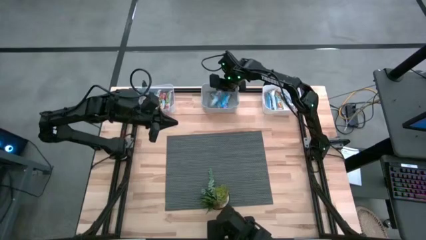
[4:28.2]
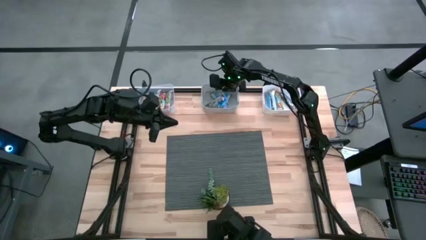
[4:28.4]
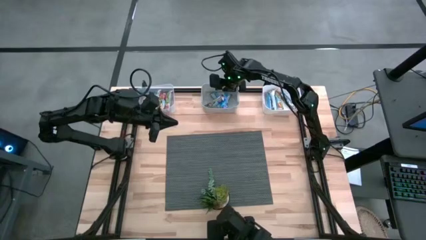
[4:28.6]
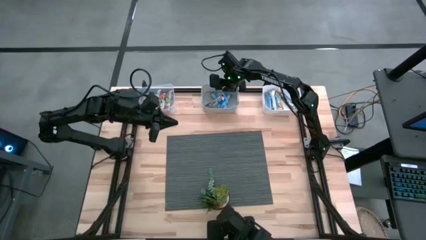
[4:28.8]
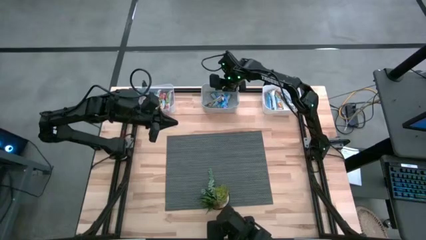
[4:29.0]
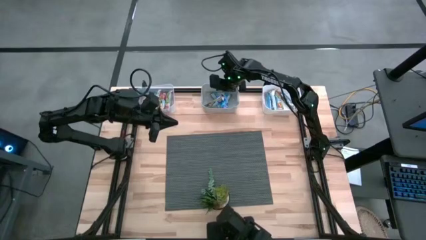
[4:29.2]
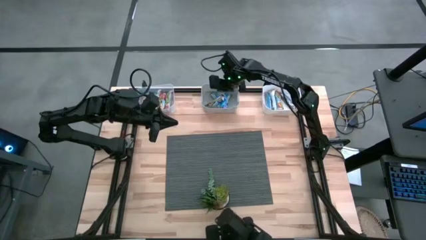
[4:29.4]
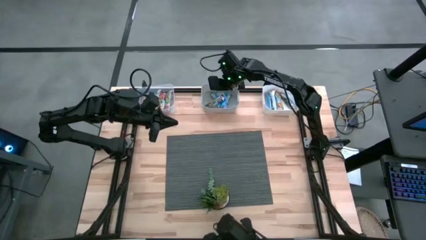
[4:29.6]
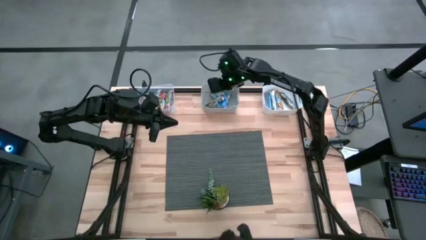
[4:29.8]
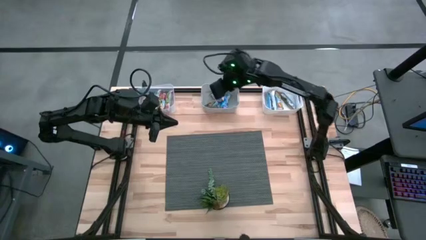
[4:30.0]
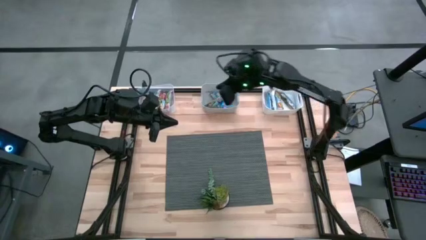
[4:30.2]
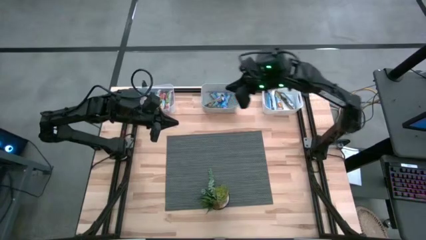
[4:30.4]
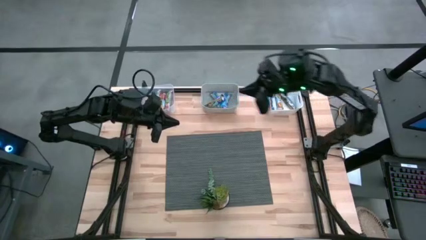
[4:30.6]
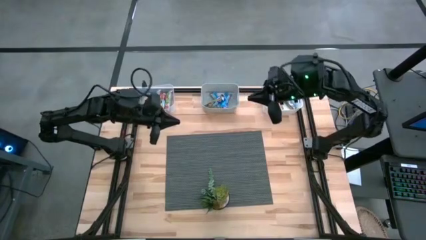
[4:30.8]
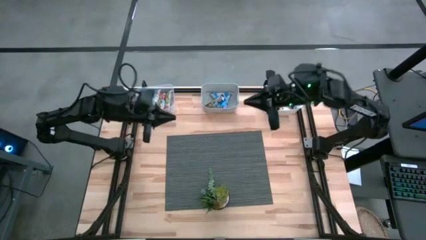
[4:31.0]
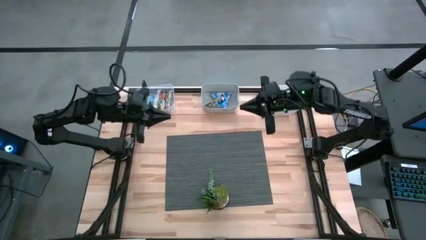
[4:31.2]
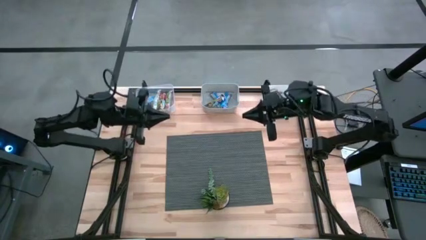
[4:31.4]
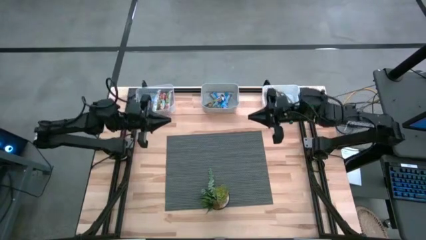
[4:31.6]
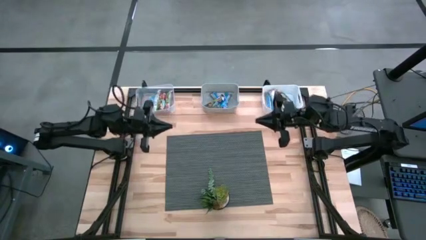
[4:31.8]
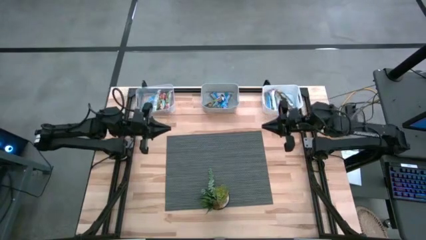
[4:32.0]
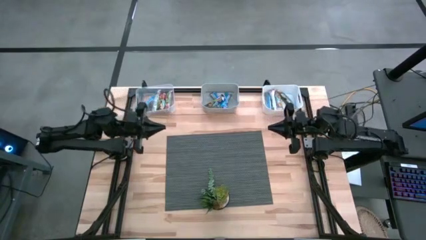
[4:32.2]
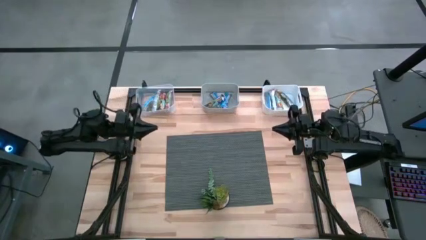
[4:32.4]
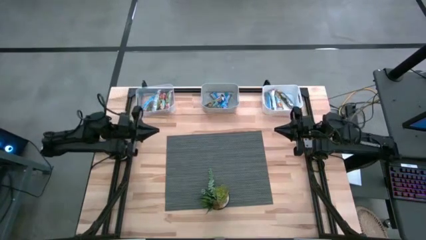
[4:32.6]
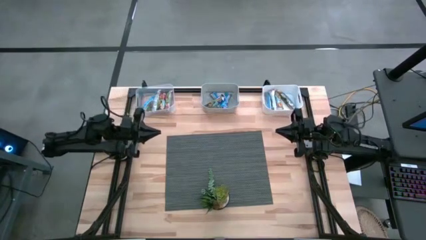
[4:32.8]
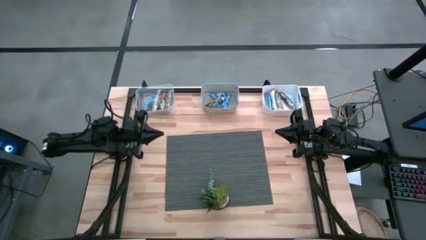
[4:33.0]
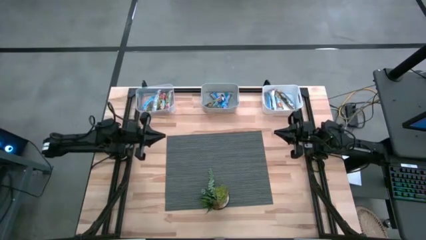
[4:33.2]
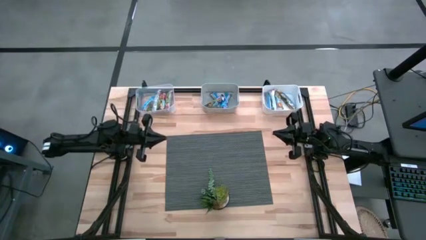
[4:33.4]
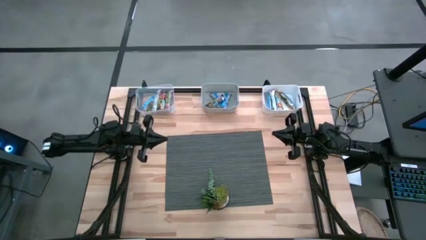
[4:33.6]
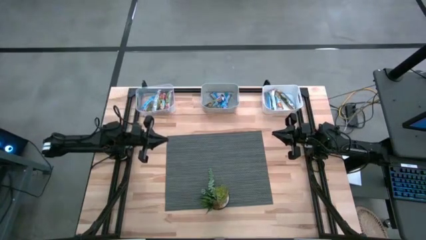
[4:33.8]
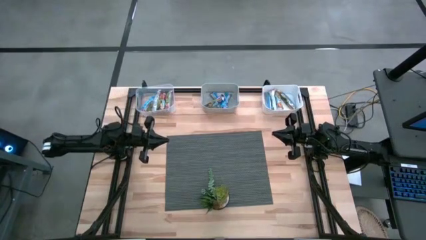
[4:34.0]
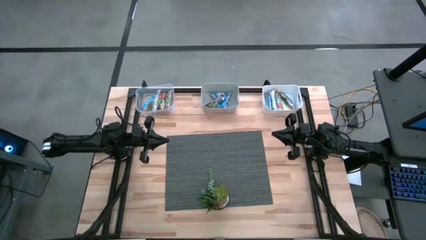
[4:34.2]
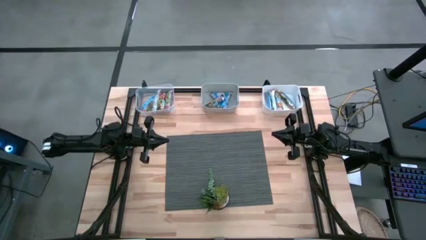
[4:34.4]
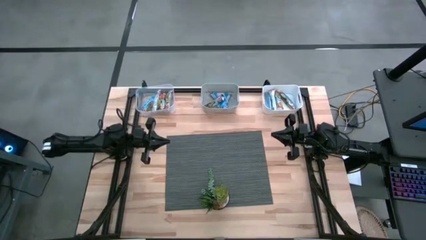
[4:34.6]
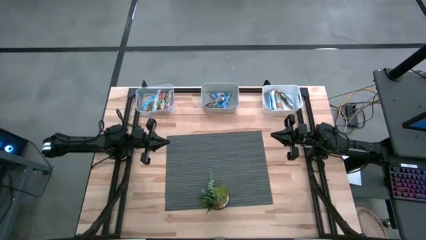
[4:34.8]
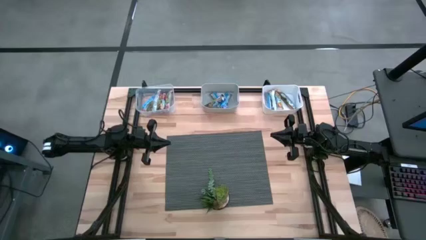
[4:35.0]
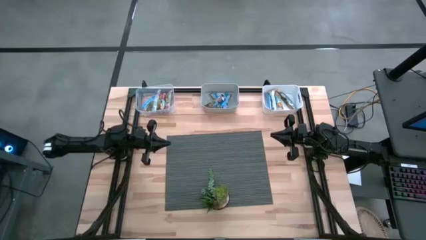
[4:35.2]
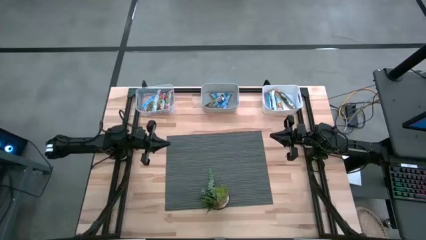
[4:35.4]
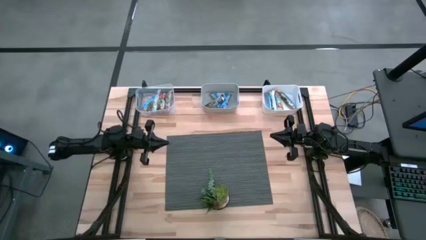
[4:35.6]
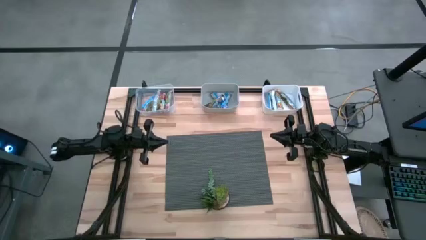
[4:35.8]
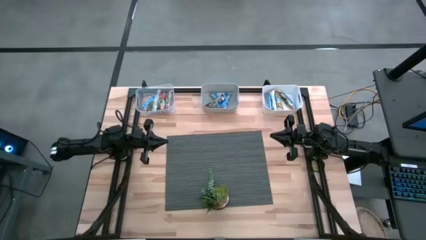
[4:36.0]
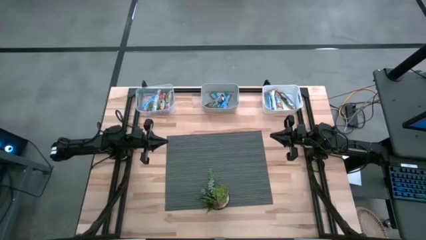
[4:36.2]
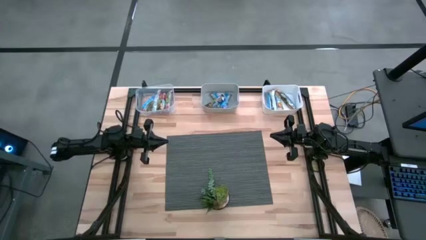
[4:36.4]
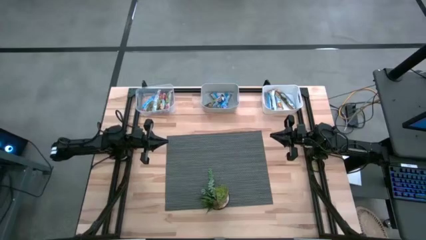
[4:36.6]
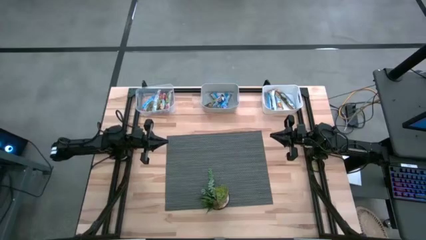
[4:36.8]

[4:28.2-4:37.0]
Task: Pick and place Granola Bars by type
Return to Home Position

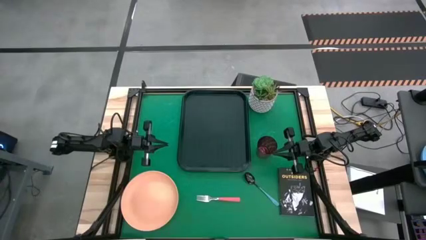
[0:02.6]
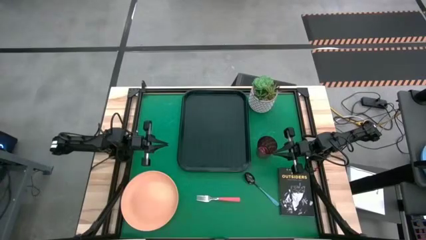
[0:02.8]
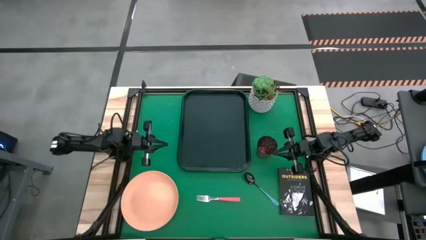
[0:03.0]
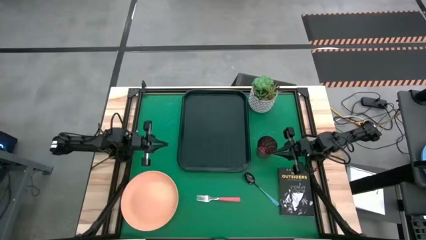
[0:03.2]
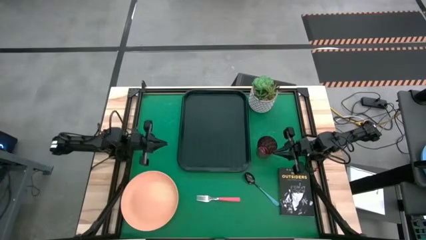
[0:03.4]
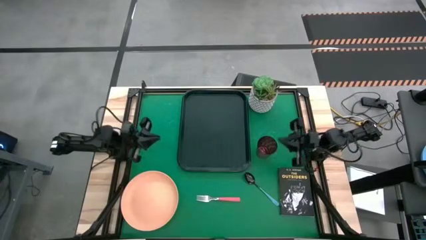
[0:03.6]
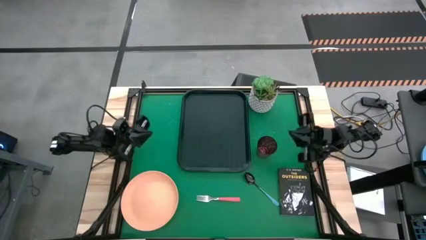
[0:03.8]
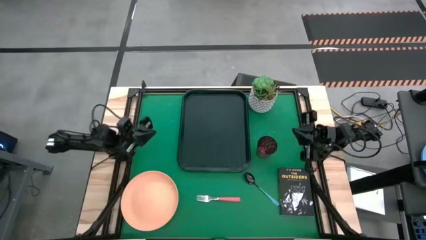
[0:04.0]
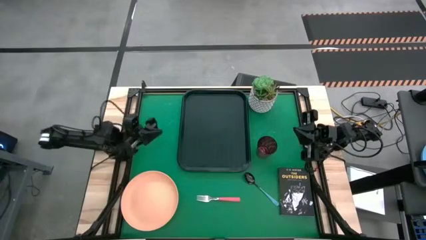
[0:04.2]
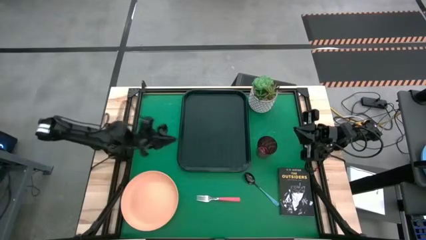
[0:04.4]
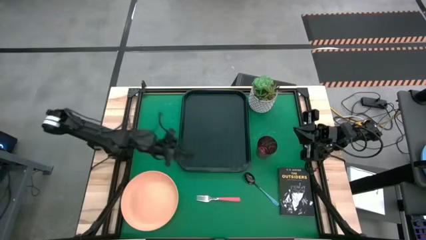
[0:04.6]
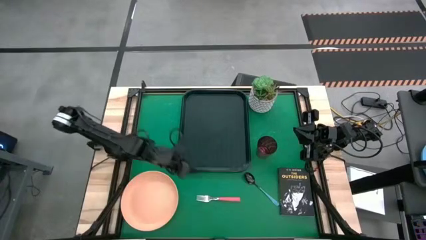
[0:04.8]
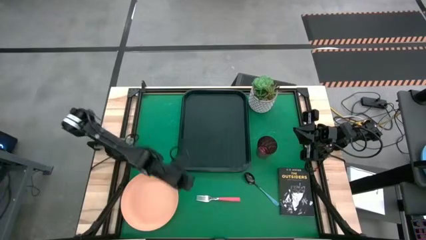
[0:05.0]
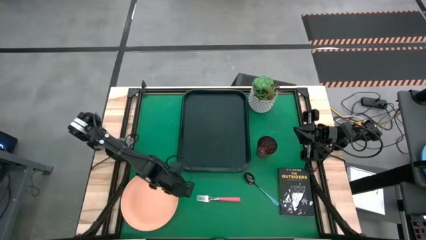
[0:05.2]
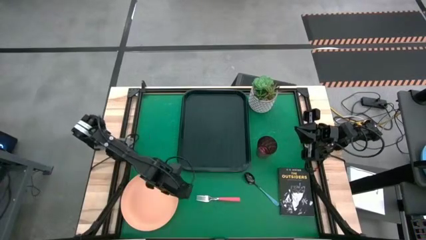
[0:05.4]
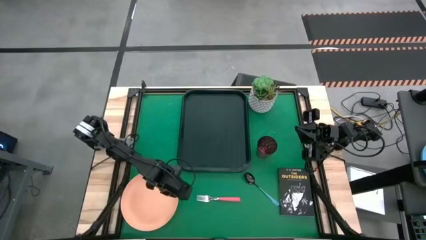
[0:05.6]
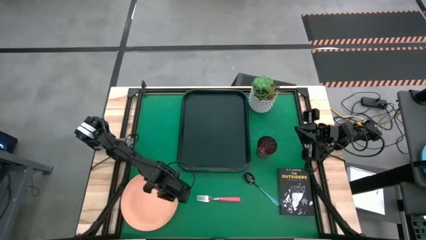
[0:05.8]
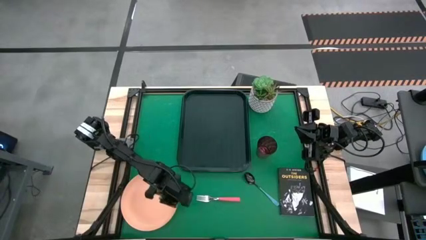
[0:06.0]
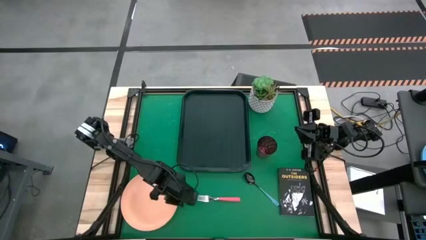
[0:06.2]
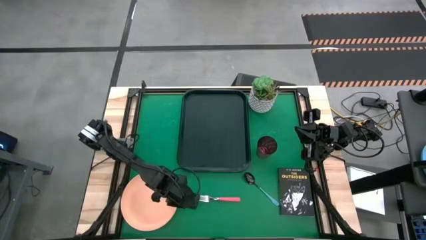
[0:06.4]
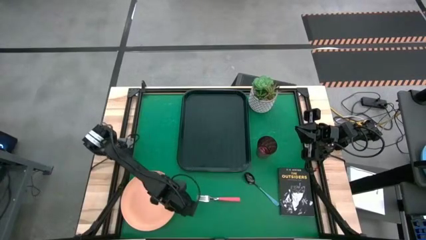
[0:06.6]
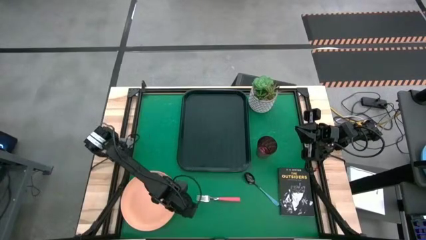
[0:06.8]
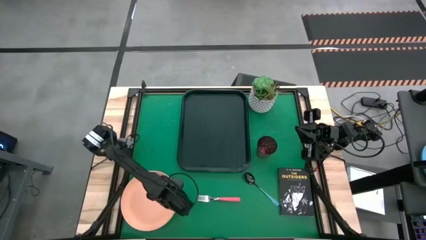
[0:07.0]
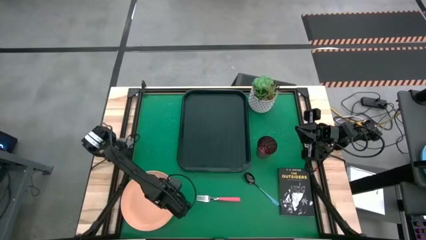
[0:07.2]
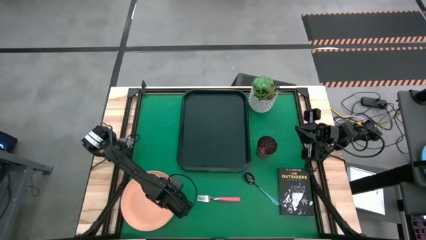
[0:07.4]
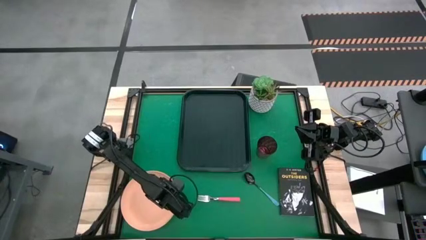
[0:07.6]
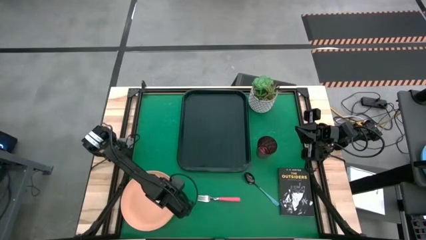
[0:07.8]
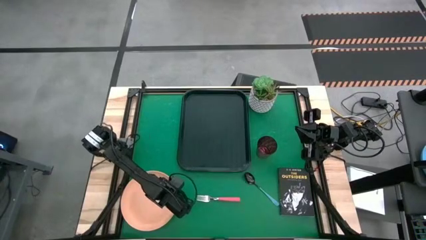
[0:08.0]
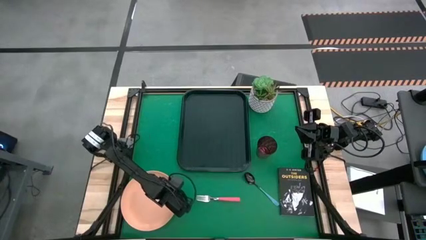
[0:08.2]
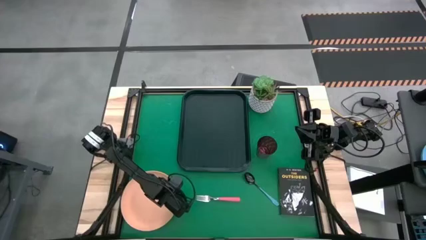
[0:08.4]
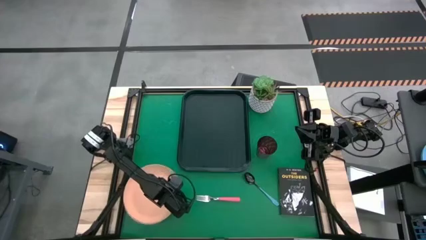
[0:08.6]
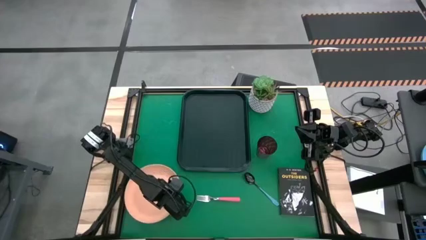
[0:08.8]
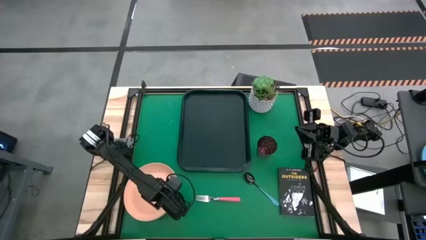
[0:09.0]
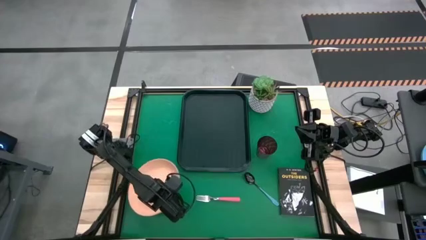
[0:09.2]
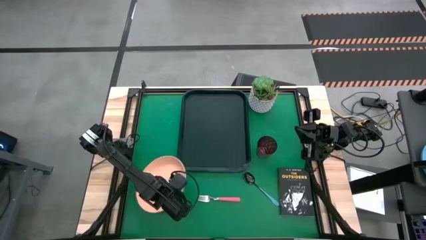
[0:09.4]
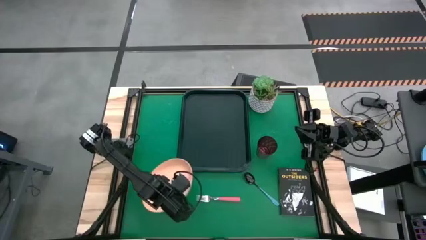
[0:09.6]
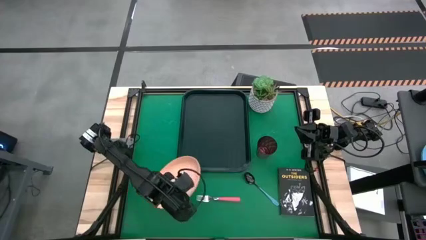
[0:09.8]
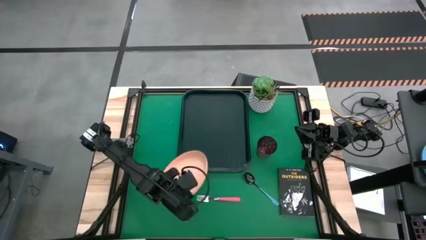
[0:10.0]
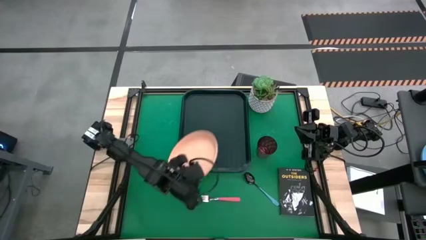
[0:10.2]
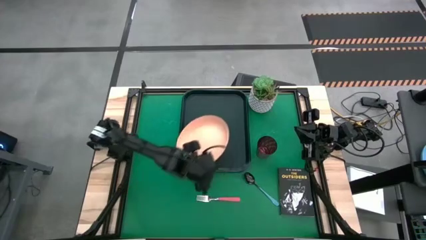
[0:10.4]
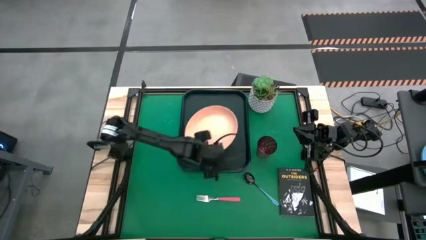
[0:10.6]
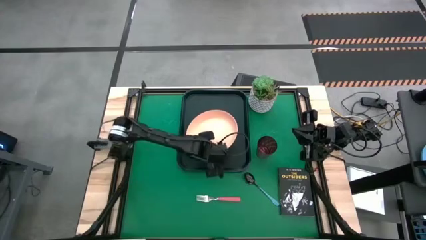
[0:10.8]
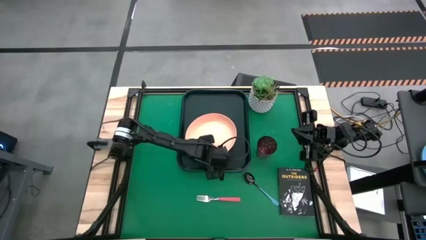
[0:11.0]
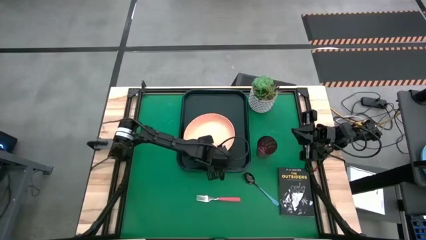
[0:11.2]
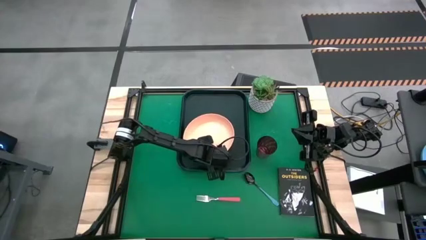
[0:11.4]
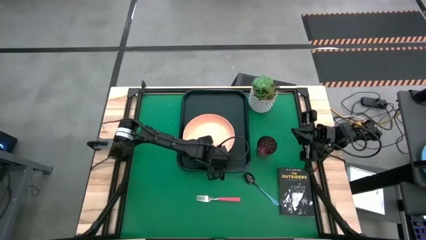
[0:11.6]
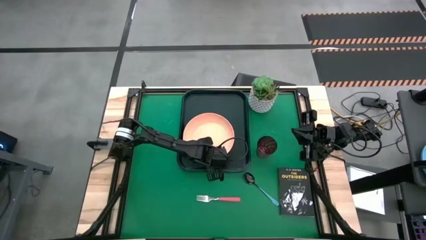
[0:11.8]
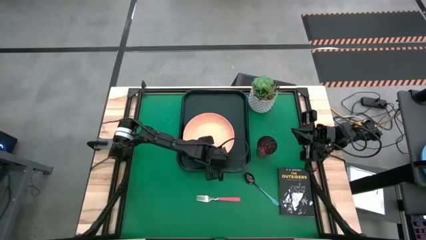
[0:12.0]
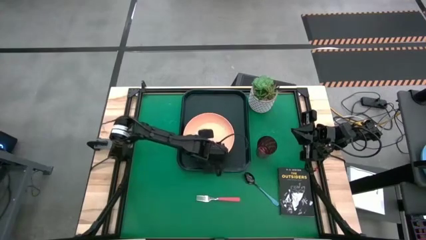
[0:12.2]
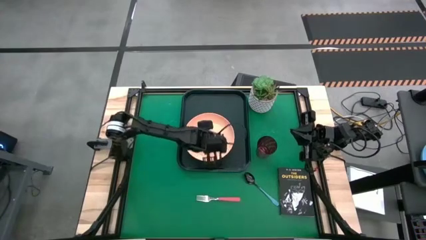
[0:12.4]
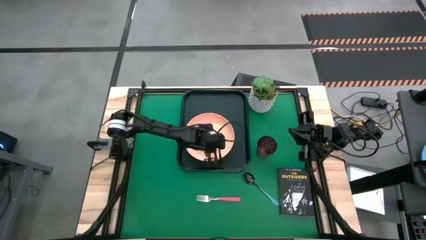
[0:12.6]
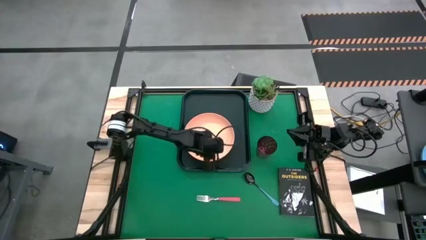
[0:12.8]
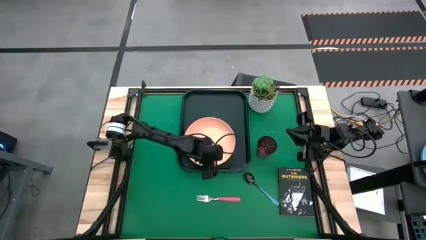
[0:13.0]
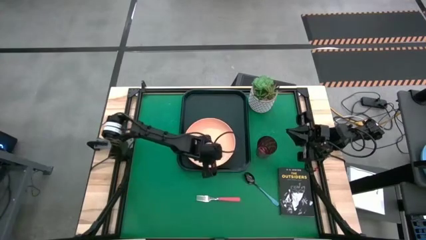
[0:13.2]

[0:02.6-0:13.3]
Task: Pick and place plate/cup/fork/spoon on tray
Put the light orange plate on the black tray
